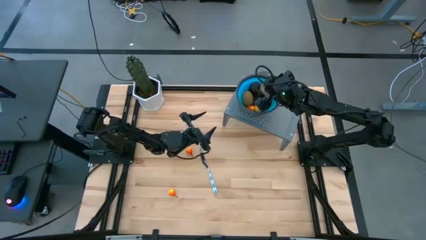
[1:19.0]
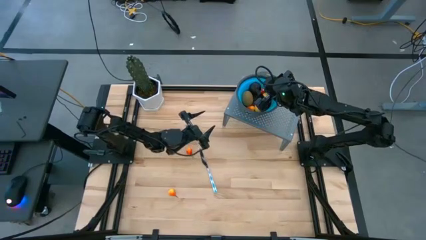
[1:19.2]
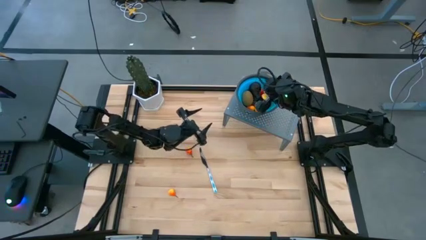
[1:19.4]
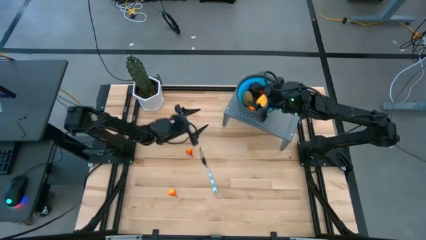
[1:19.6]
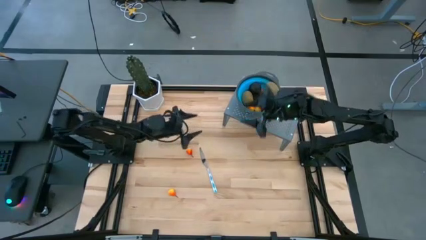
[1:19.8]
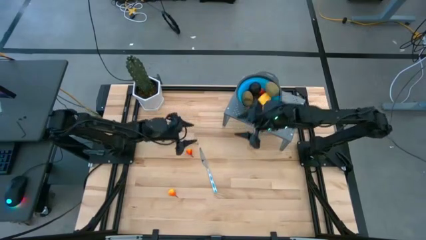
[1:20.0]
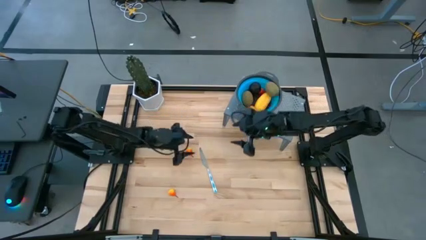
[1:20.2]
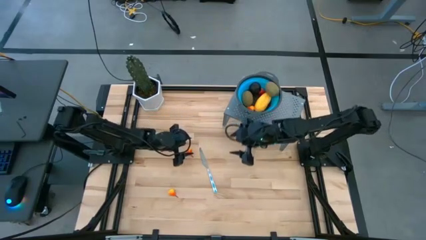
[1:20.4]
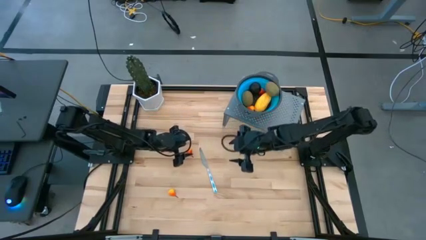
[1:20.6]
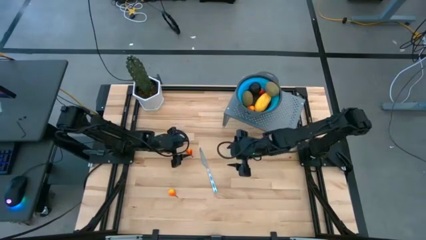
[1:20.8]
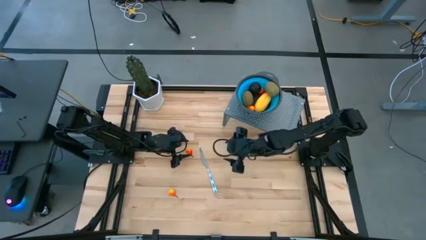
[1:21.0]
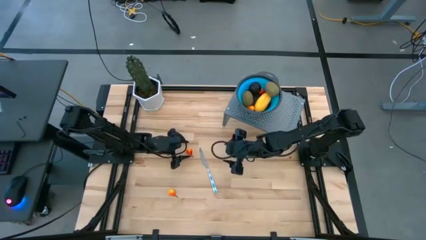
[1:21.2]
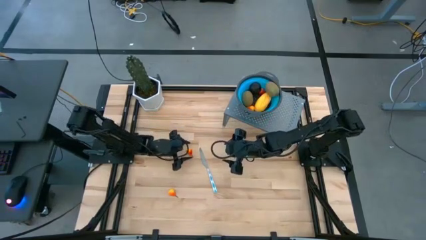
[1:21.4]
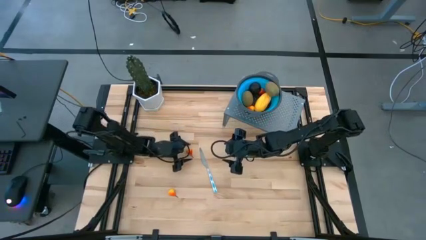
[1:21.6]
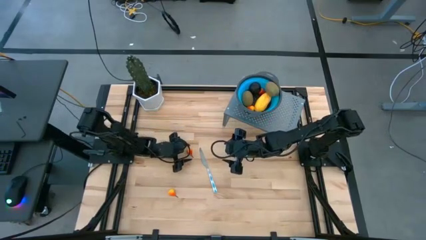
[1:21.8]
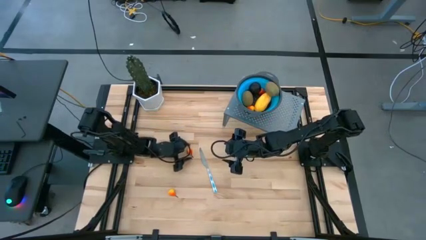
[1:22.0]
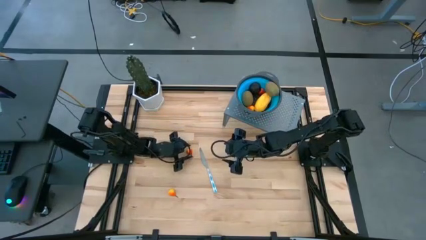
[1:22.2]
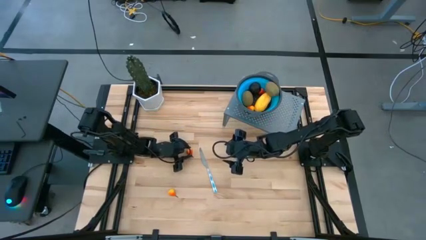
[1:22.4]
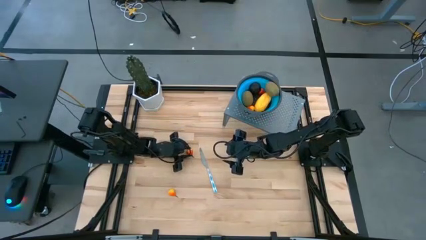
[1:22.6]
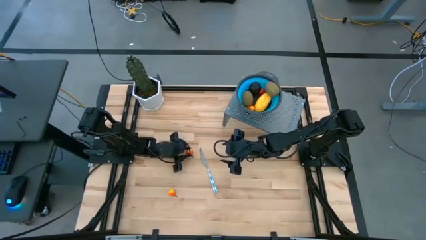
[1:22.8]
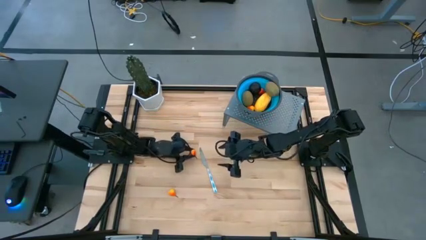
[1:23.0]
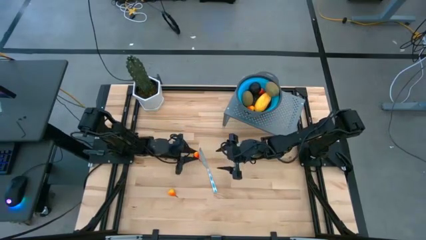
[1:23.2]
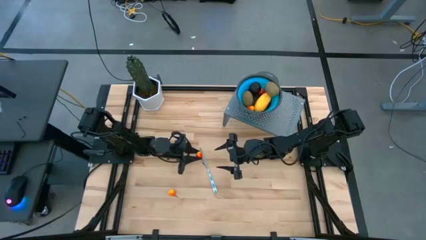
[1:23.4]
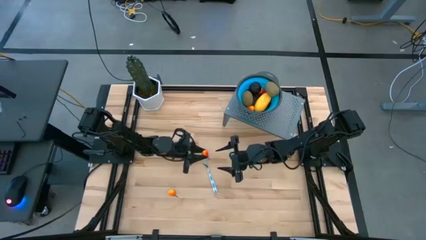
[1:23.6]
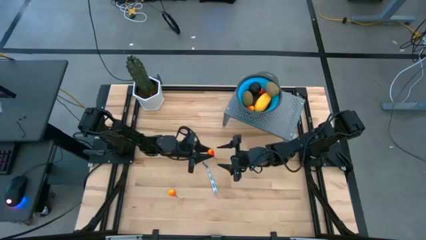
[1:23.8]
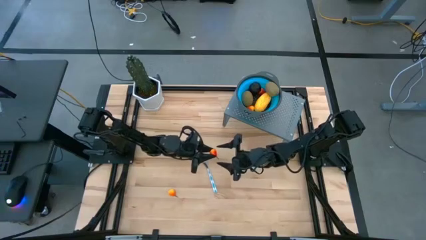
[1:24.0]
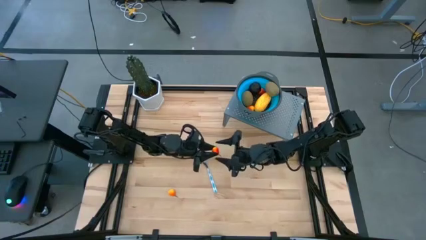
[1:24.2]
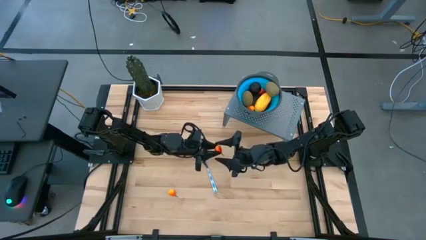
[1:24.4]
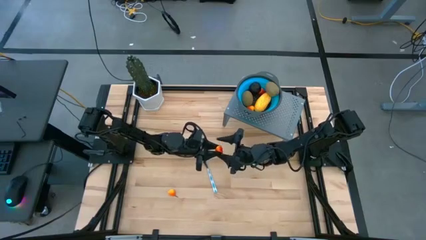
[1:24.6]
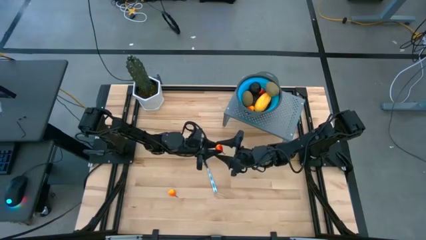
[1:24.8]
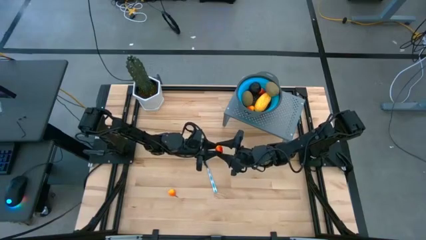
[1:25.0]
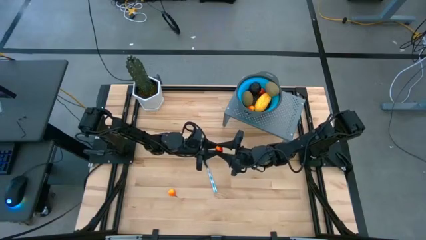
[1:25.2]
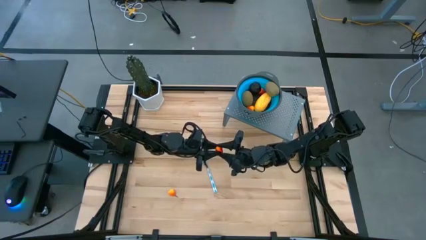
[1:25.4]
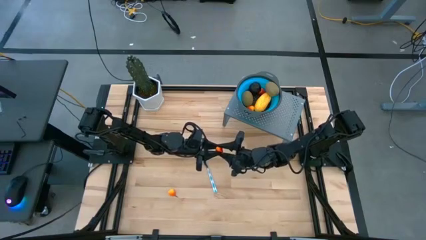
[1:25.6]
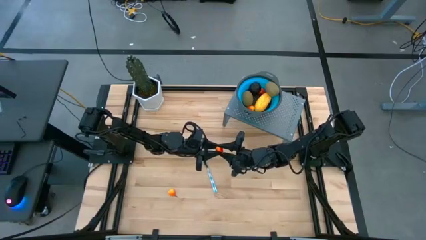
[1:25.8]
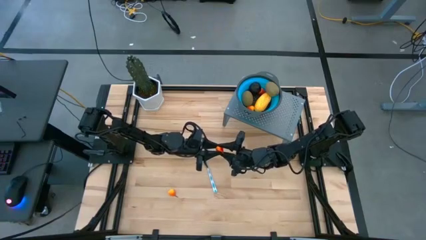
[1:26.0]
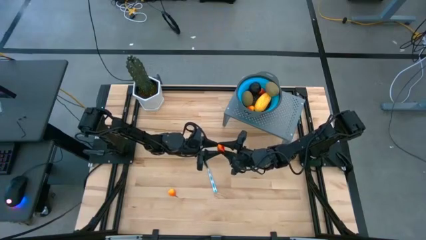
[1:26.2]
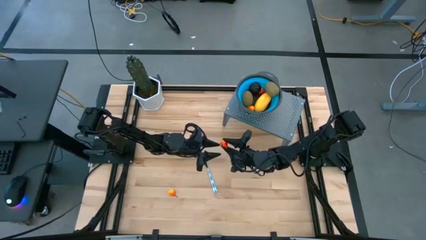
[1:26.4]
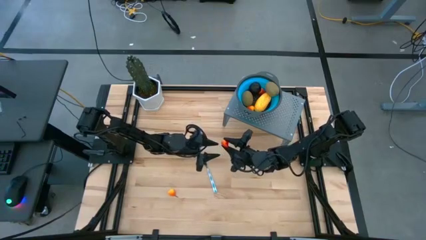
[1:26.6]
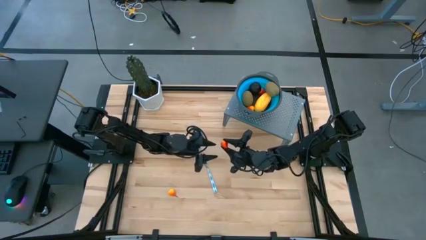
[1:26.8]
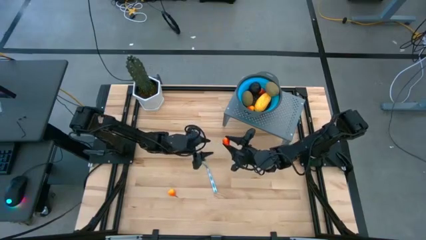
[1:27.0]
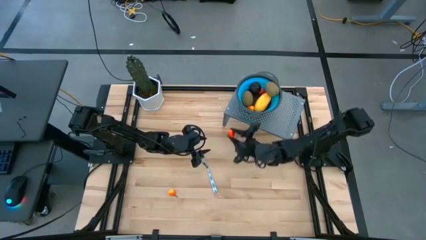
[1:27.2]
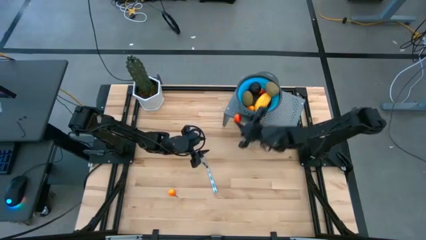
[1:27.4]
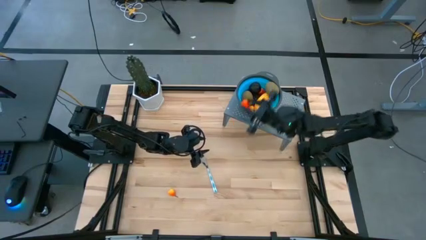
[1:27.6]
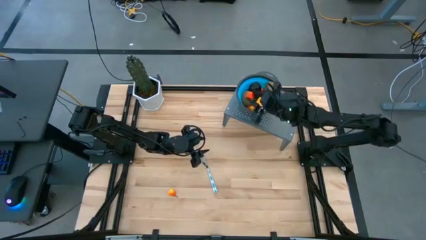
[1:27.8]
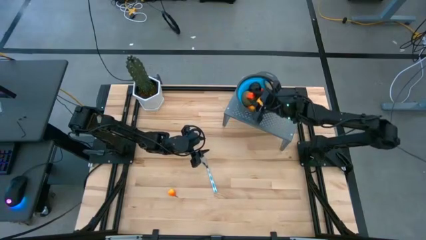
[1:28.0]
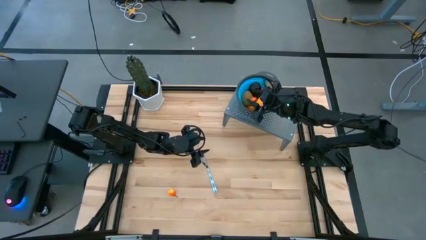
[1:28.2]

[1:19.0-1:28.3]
Task: Pick & Place Fruit
Put the orange peach in the blue strainer bowl on the shelf

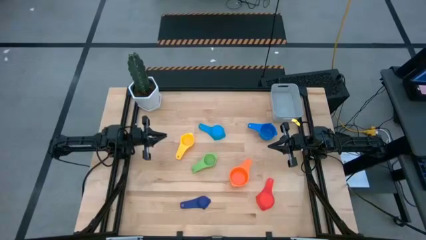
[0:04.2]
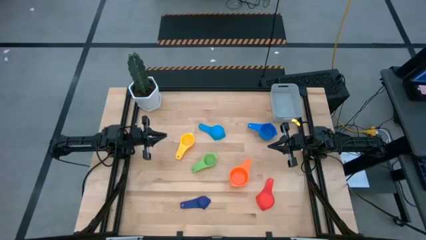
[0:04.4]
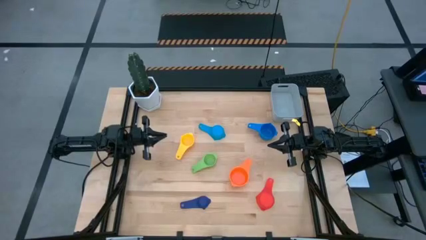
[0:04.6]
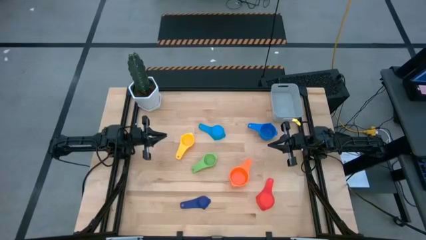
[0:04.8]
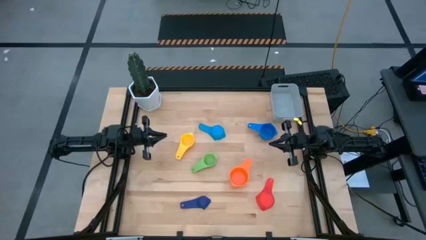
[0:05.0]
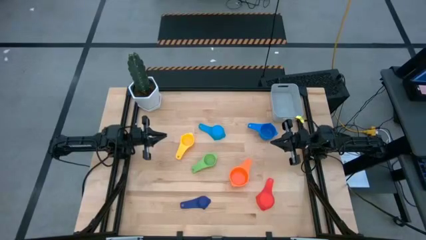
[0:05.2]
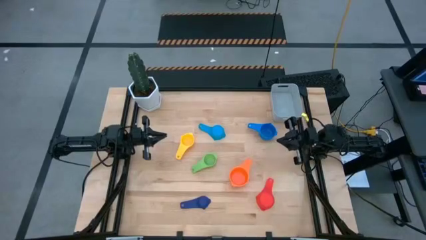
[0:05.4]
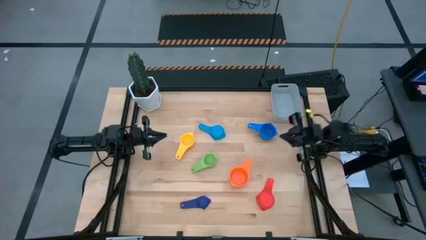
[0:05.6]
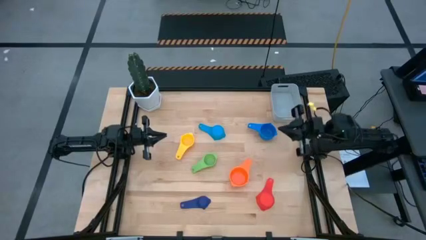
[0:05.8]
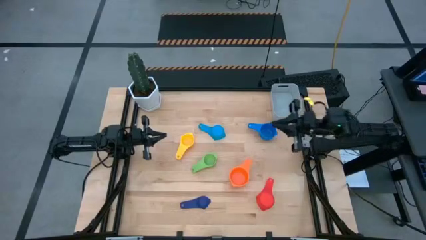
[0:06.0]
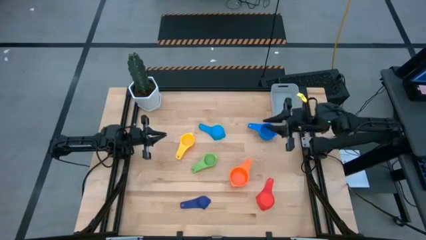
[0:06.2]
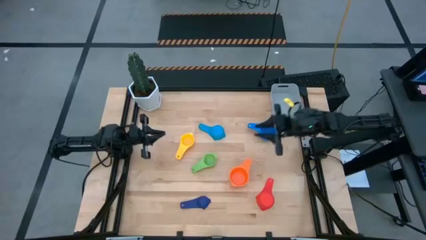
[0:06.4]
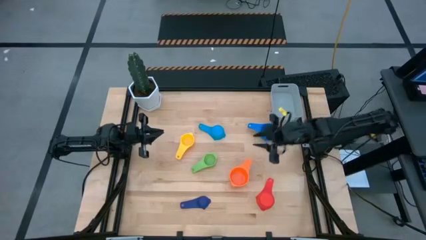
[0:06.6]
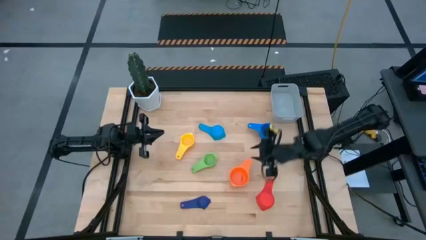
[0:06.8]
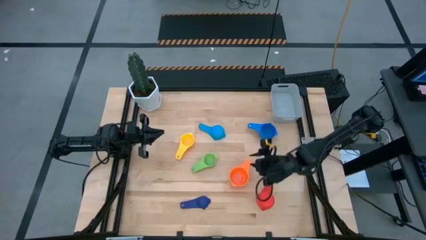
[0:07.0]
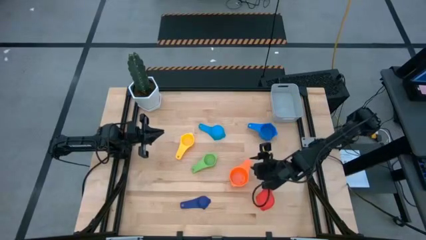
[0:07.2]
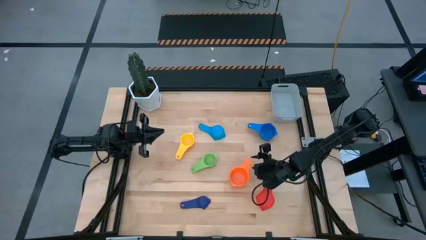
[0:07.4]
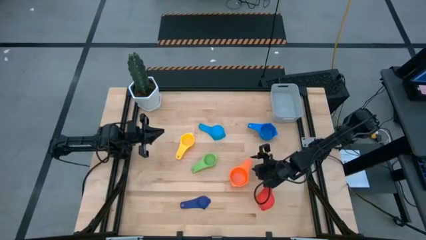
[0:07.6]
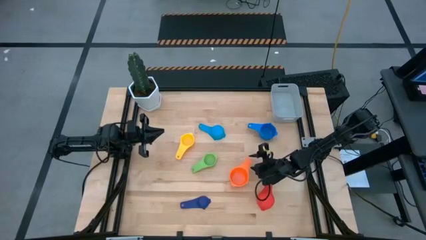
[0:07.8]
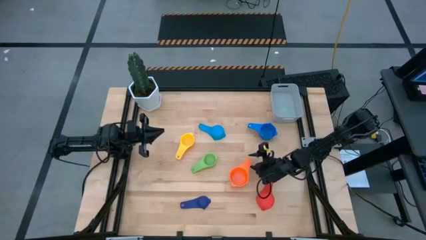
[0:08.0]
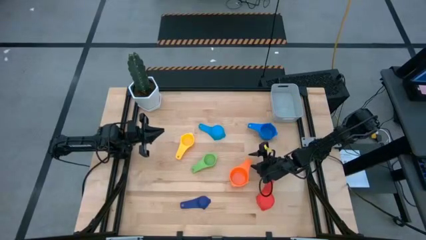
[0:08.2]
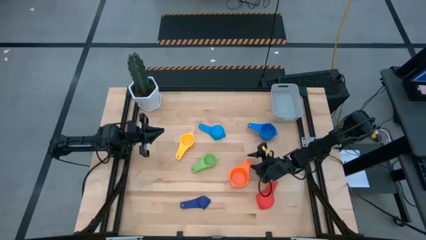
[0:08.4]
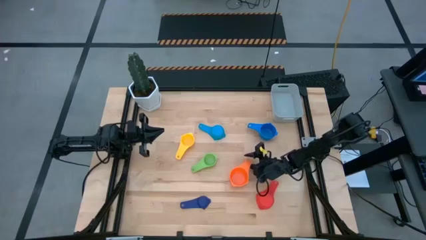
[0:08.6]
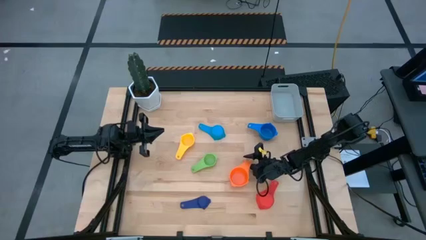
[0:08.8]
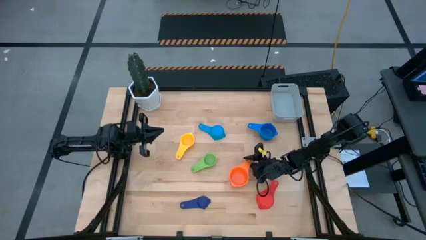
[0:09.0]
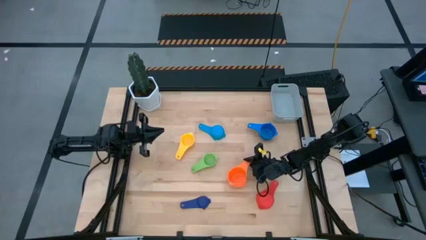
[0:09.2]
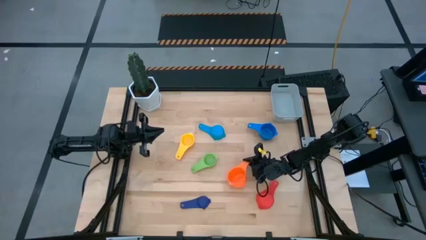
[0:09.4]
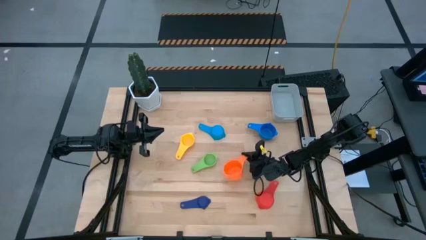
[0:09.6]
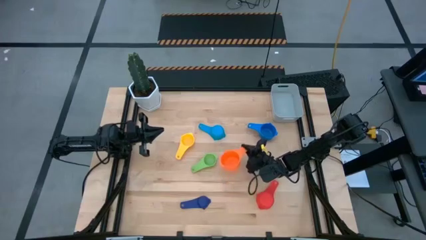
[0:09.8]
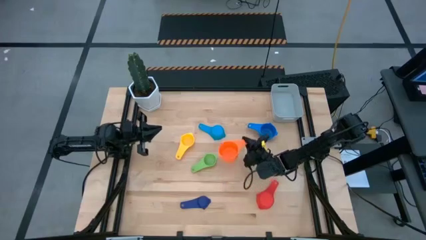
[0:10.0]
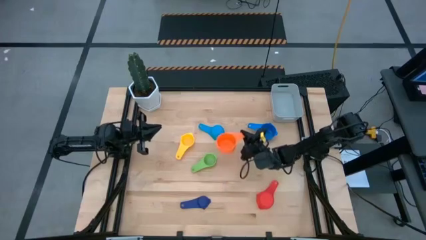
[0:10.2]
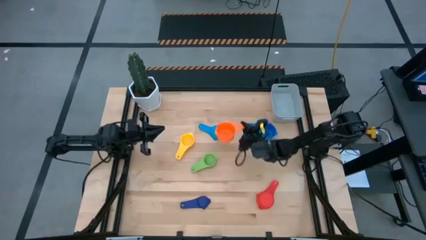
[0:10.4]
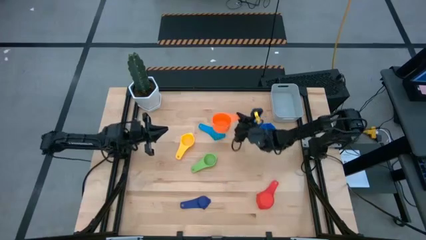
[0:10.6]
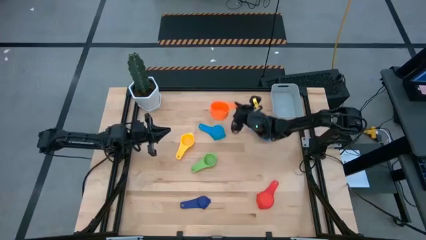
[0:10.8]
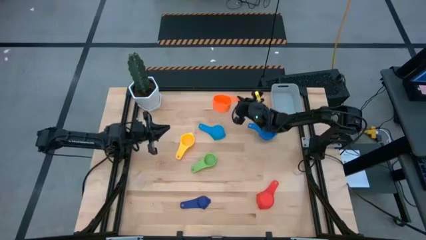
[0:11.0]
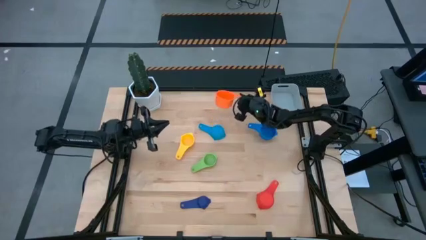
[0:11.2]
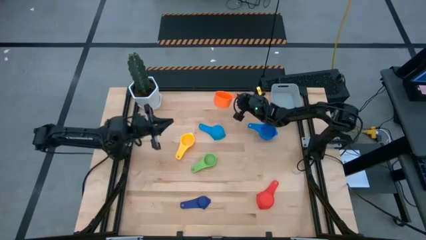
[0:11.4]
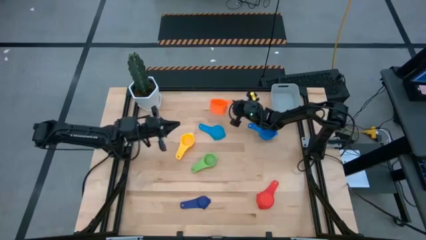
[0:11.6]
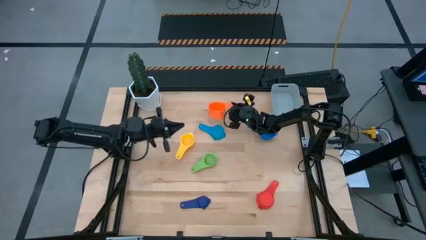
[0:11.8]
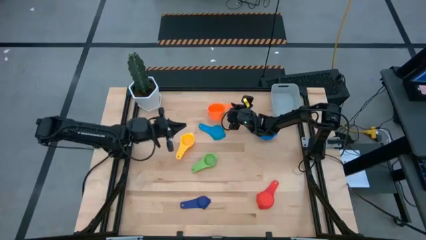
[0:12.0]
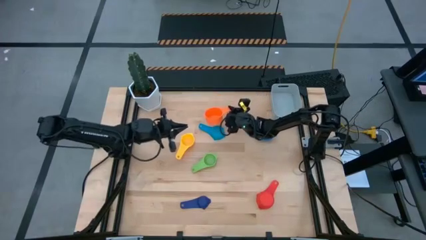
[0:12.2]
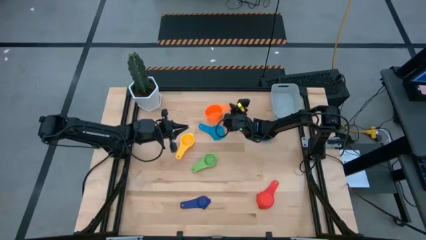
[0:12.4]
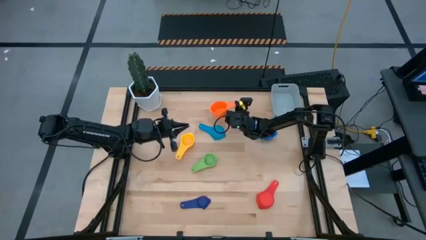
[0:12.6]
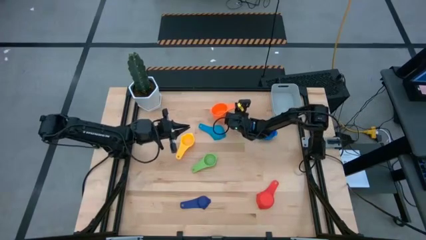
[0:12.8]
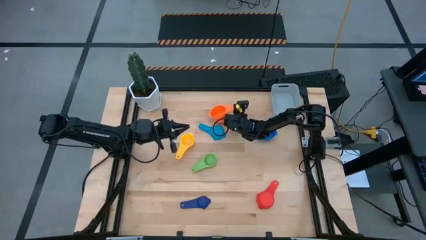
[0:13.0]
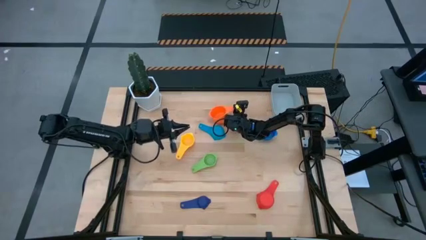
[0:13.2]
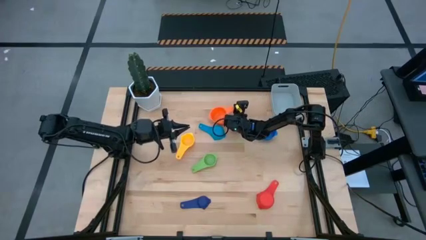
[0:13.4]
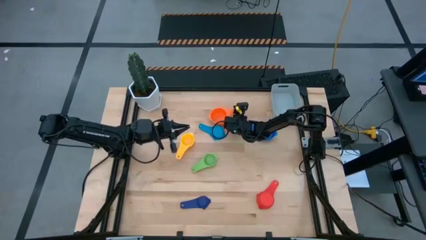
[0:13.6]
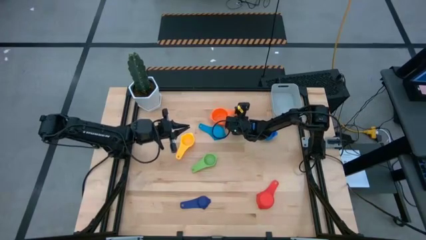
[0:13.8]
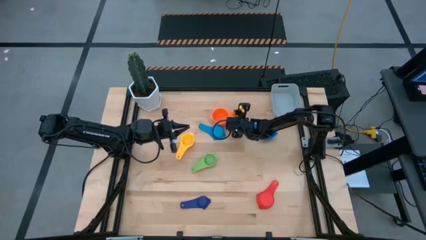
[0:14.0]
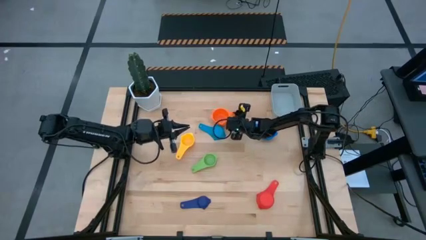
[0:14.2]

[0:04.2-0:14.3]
Task: Nest measuring cups in basket
Move the orange measuring cup to the top center of the table
